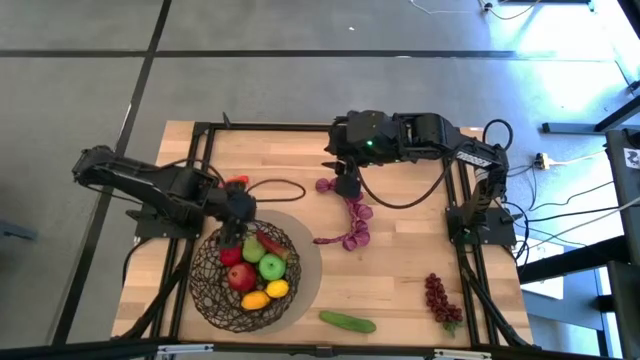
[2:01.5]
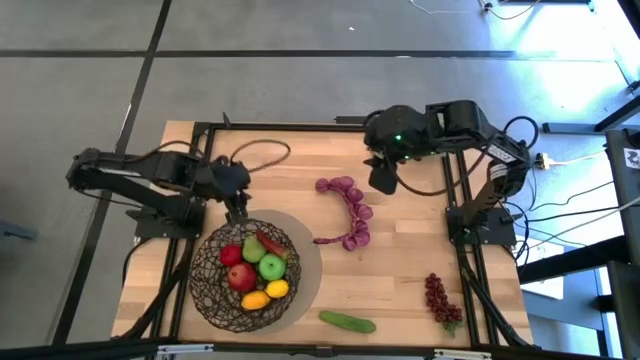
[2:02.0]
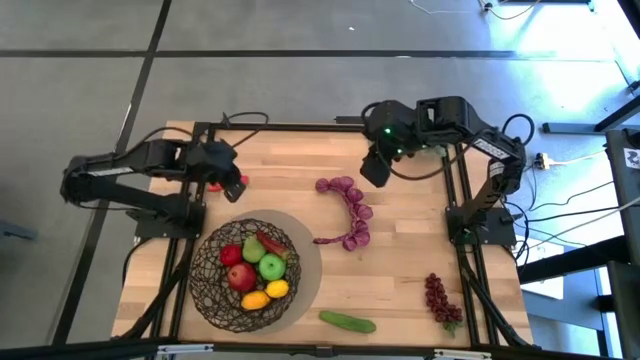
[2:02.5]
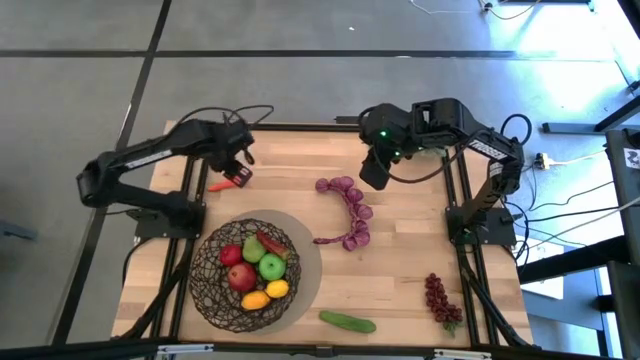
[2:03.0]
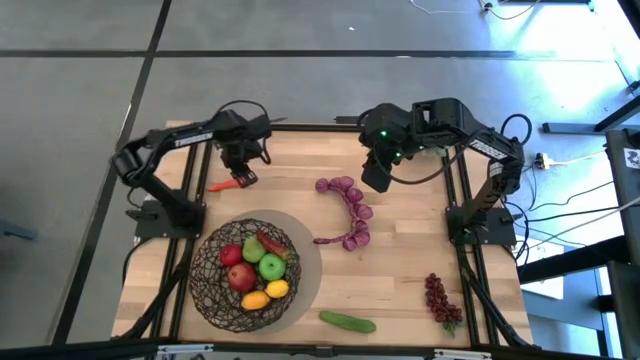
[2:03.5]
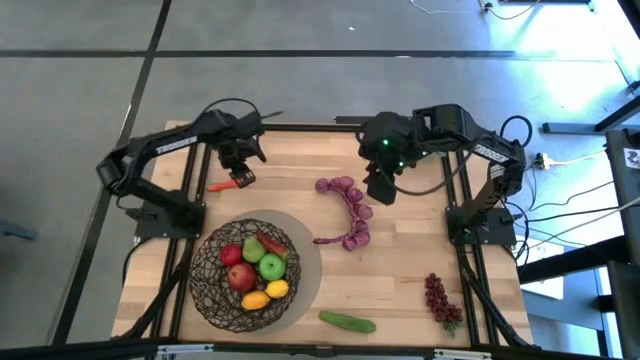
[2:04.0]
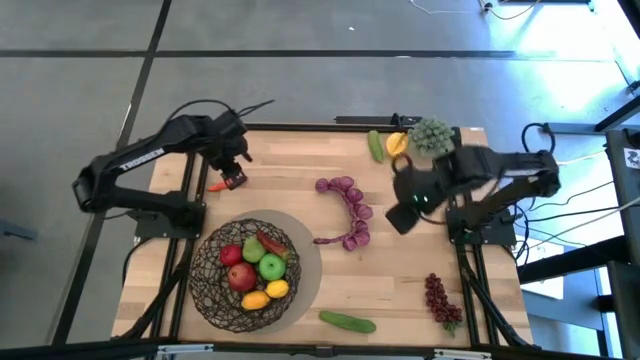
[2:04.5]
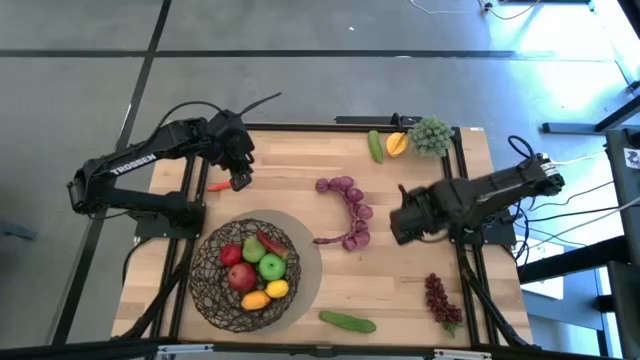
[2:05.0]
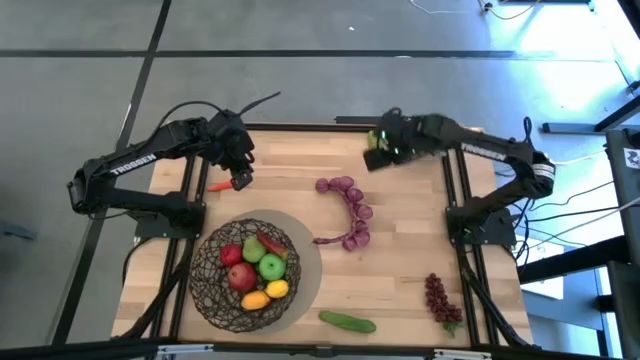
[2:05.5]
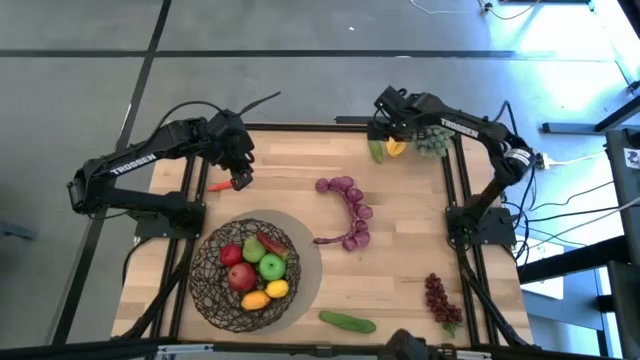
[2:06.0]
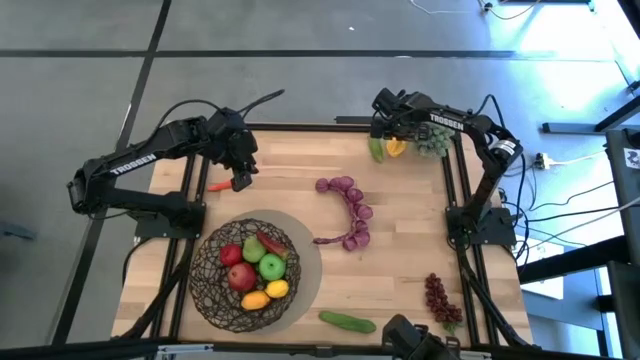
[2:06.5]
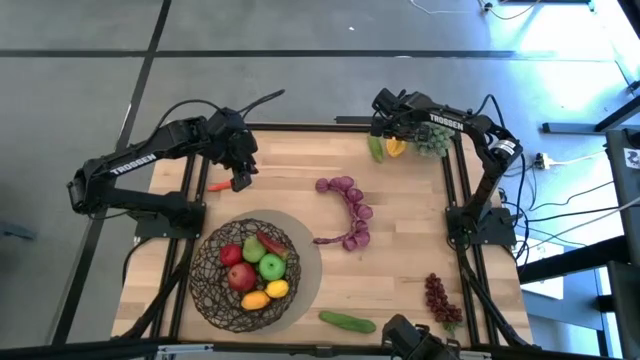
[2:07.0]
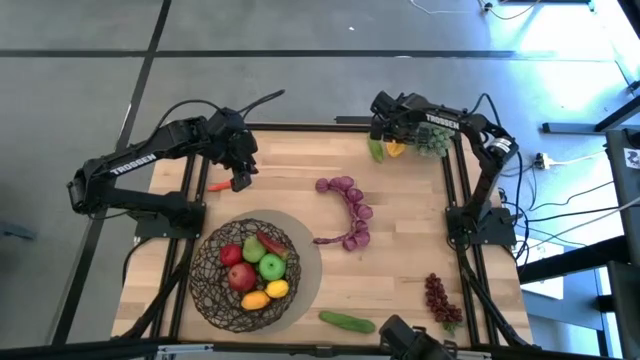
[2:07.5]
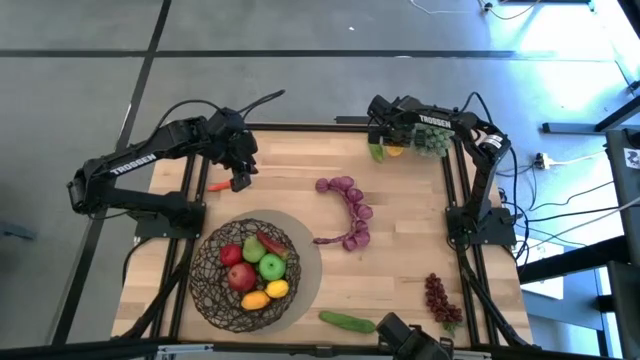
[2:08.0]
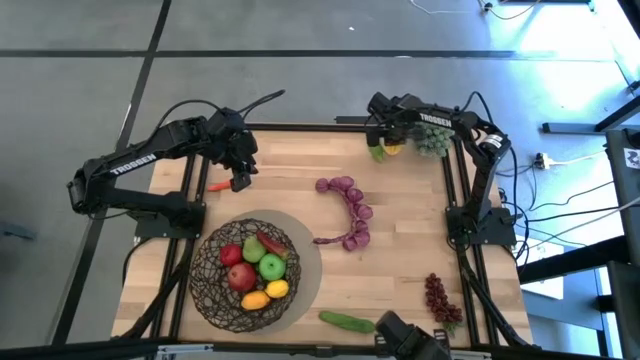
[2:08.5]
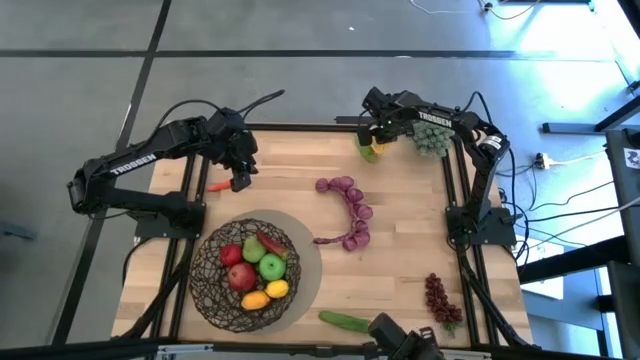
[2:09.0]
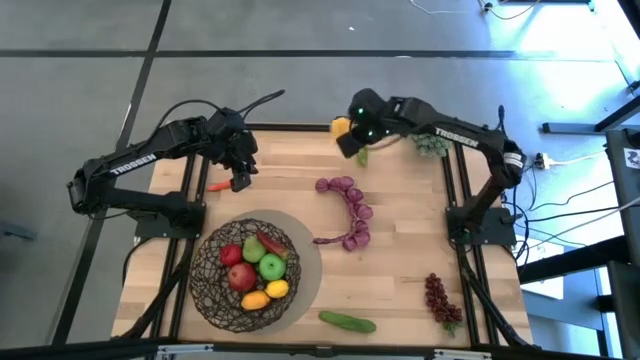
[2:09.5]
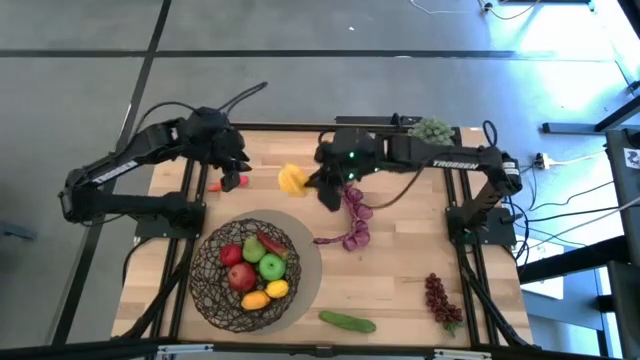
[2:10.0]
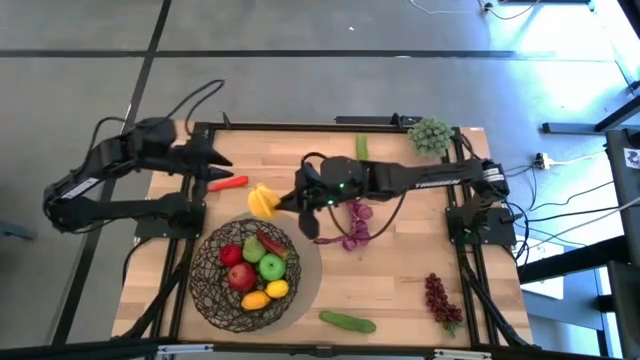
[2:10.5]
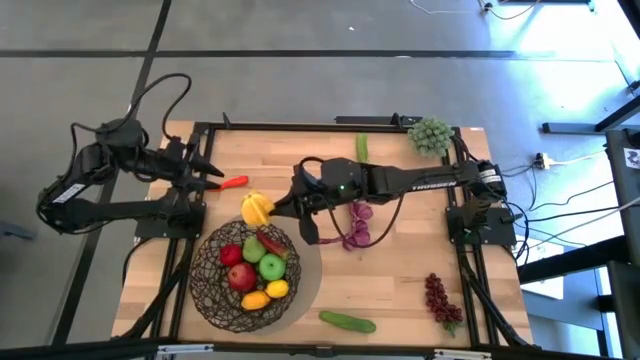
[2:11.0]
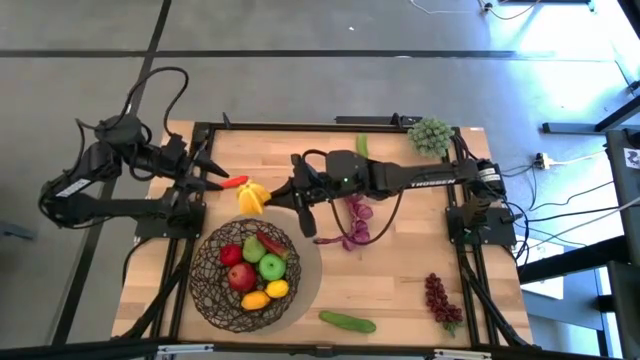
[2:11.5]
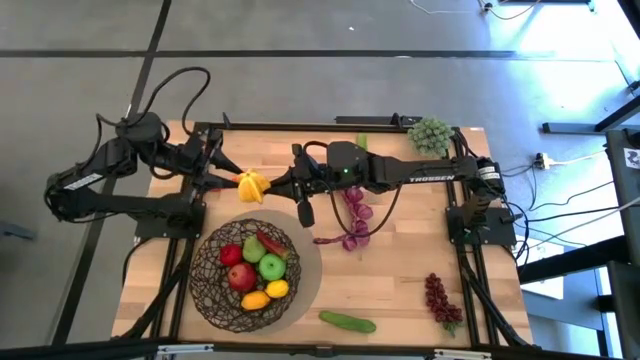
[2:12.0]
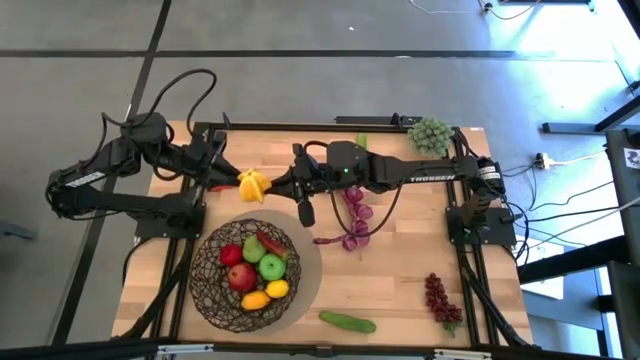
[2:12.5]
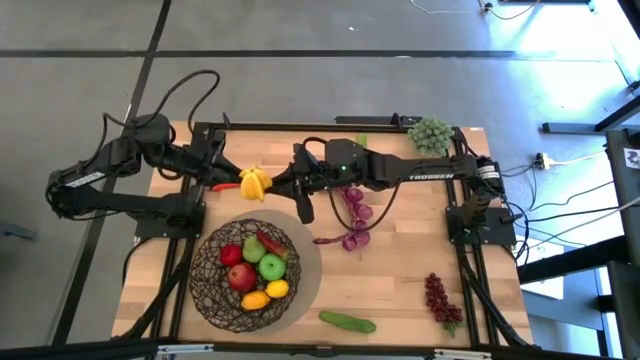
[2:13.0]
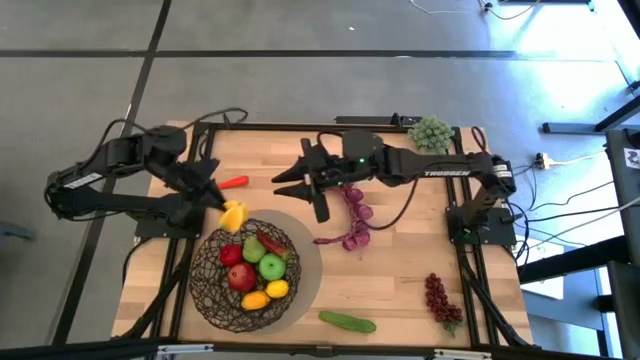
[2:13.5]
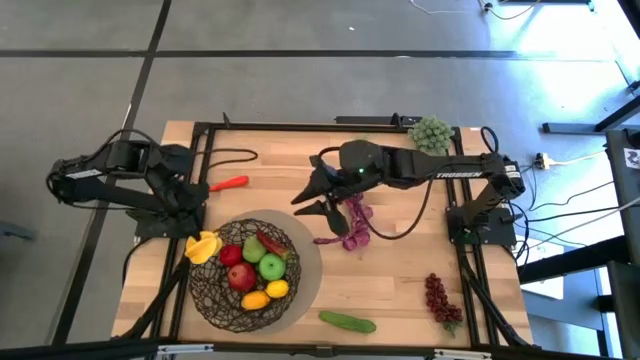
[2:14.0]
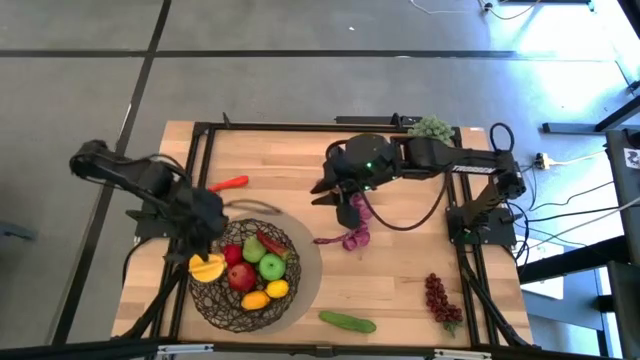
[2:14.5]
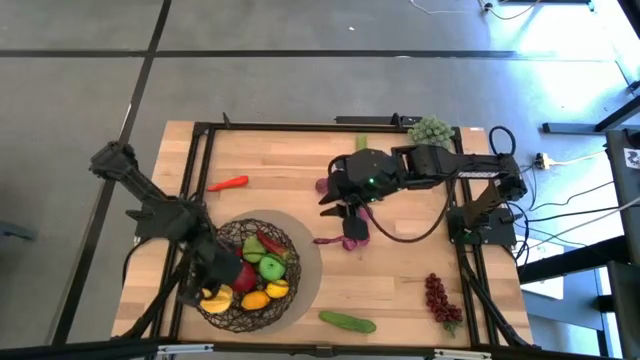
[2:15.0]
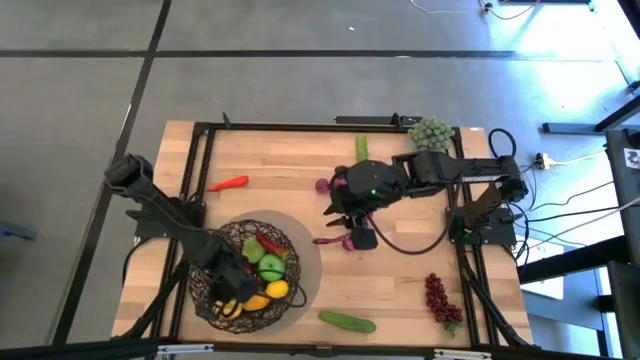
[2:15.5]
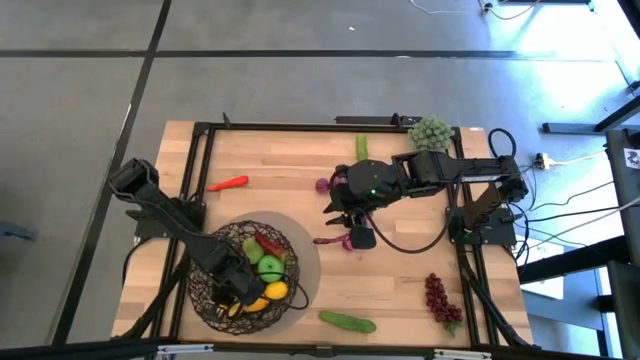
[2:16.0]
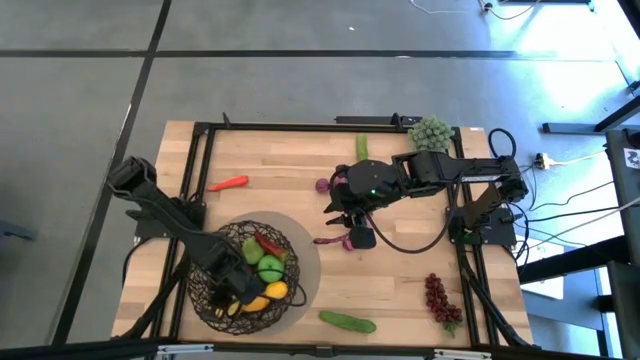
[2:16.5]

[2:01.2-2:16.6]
Task: Build produce basket
Put the yellow starfruit into the black wire basket

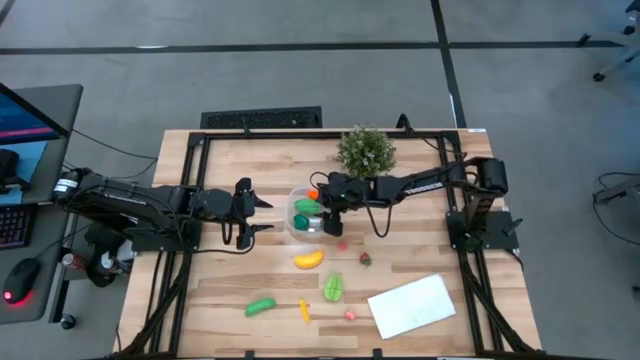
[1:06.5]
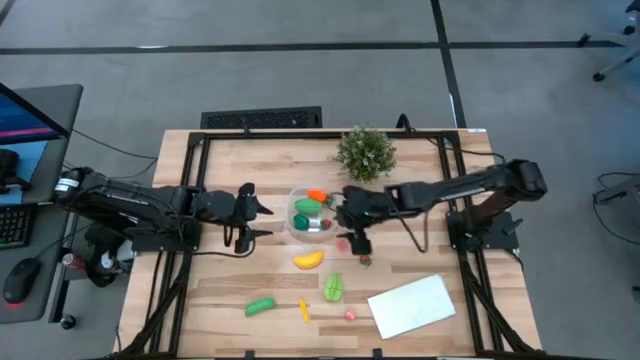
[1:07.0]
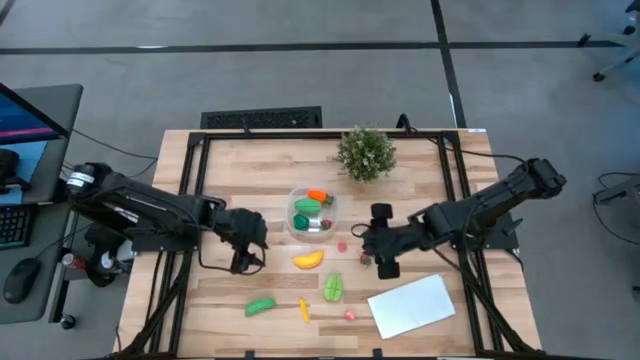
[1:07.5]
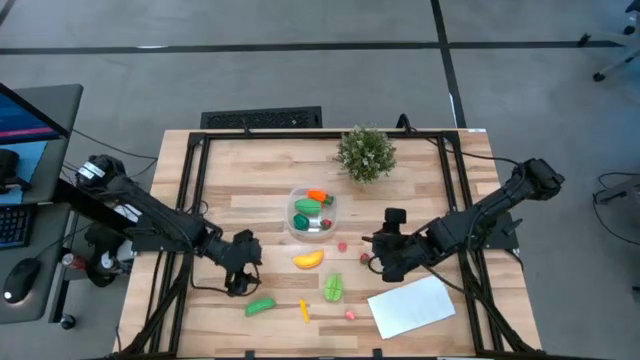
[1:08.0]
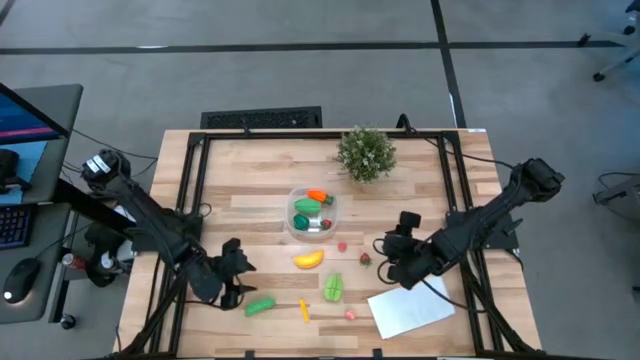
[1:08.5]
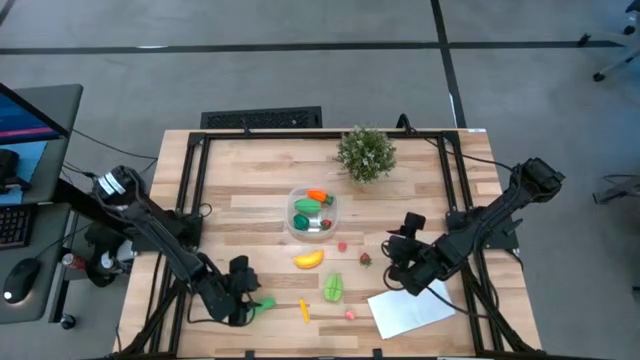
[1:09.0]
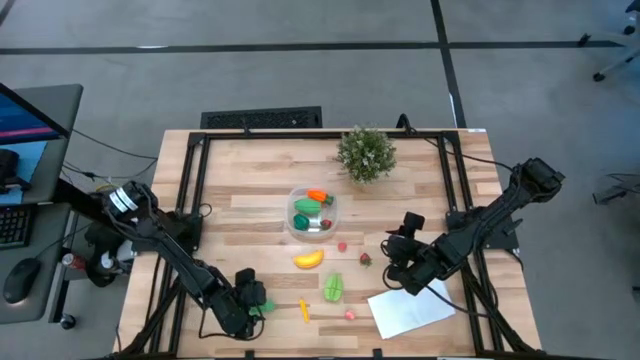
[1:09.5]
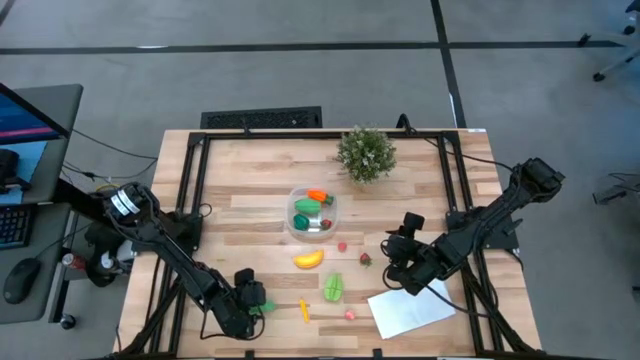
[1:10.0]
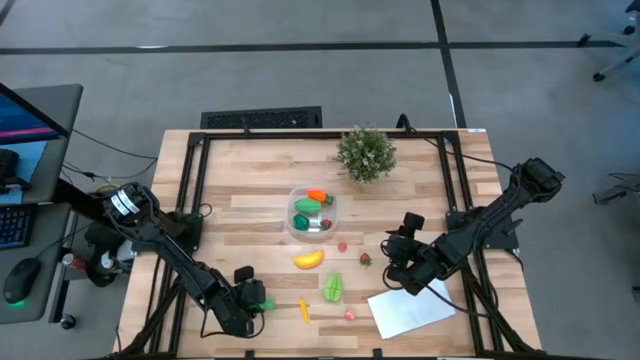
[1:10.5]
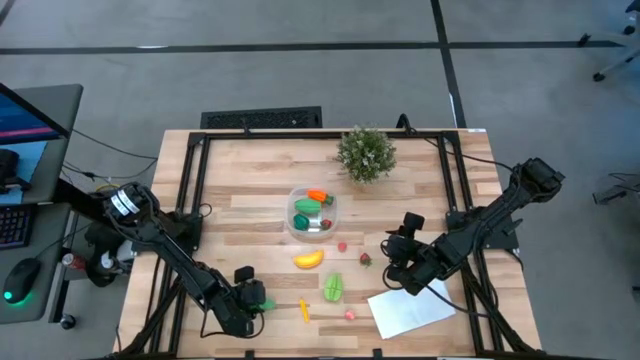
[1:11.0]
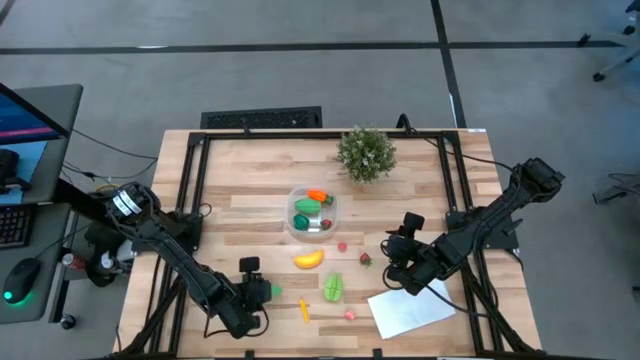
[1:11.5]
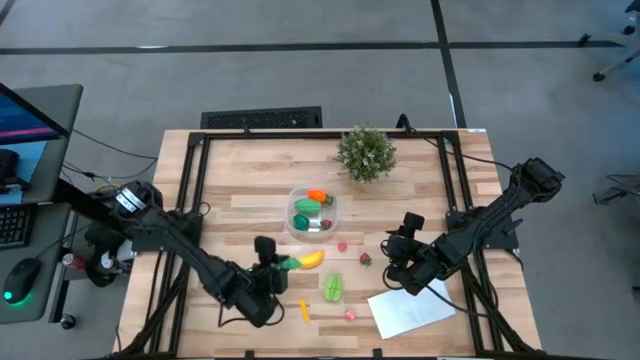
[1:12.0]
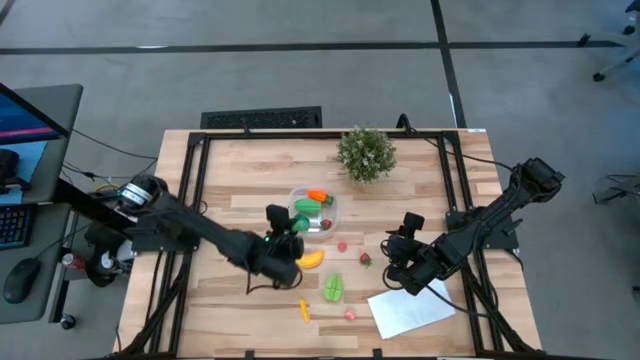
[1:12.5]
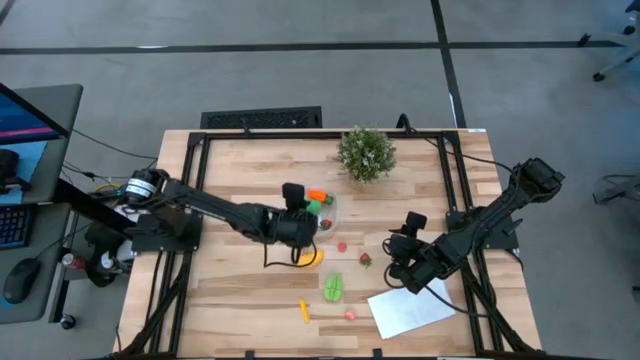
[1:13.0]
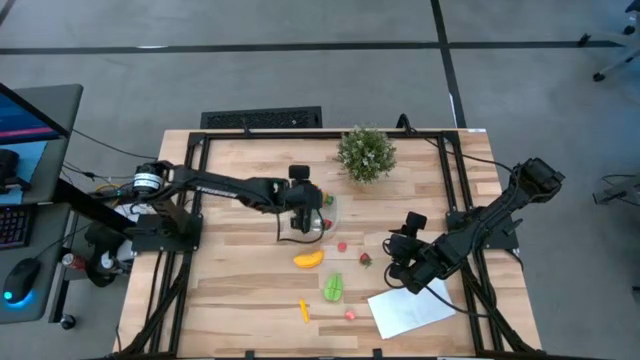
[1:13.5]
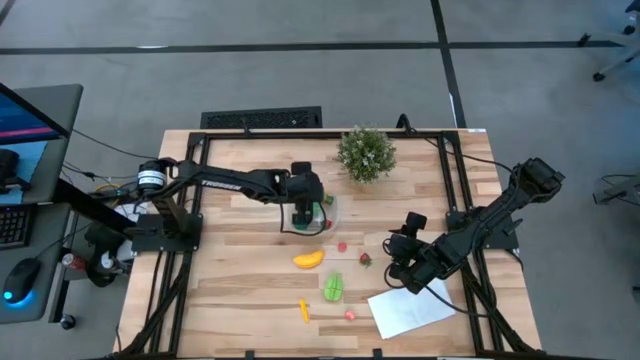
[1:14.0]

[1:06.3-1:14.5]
Task: Pick and placing Produce into tupperware
Put the green peas into the transparent container
